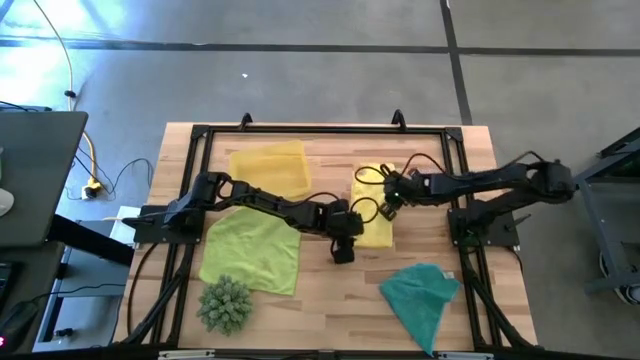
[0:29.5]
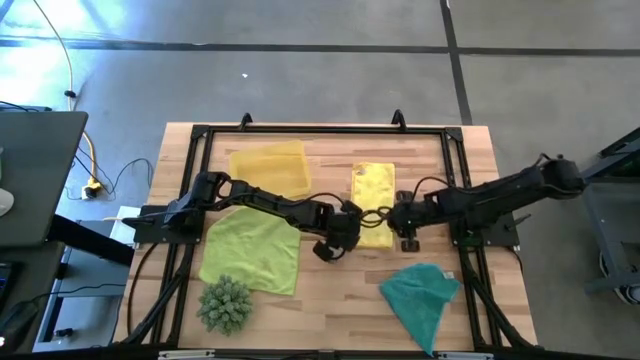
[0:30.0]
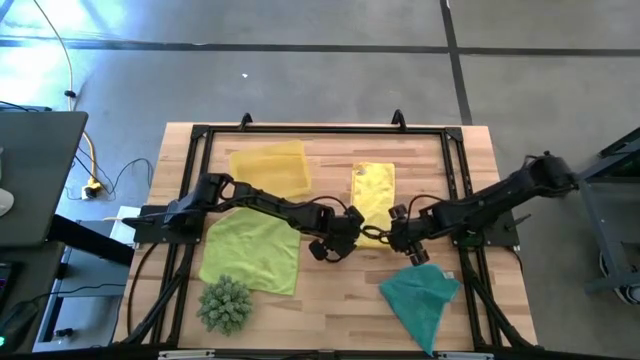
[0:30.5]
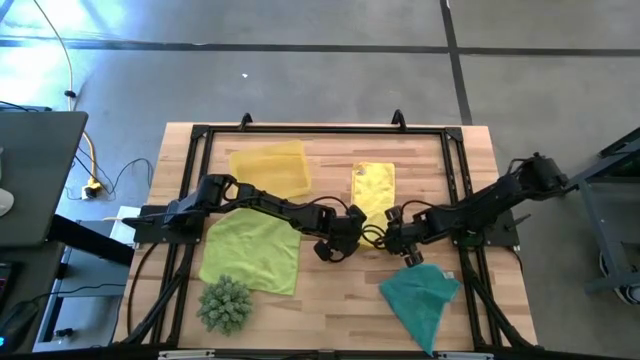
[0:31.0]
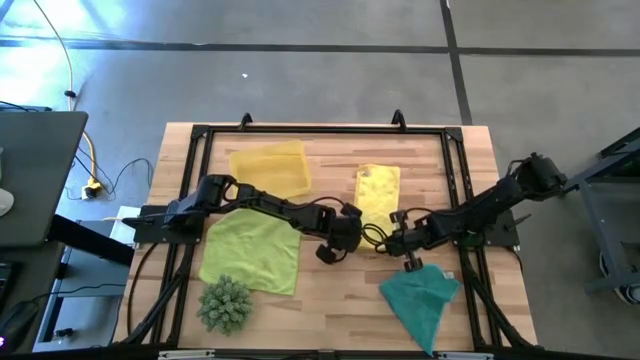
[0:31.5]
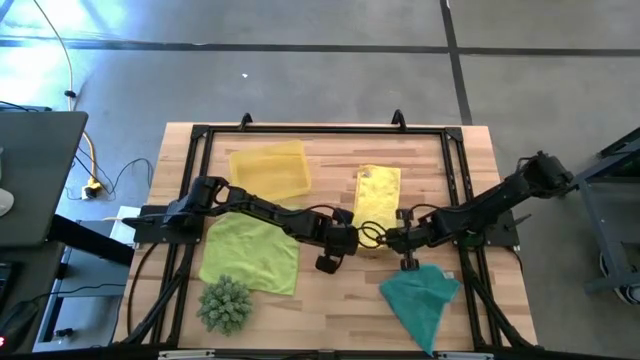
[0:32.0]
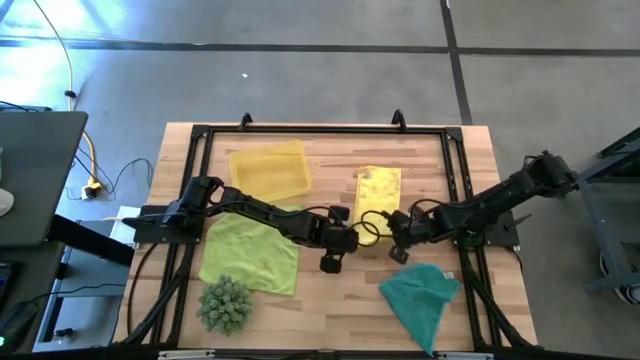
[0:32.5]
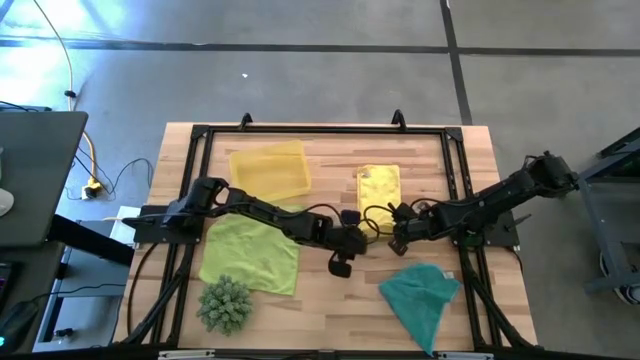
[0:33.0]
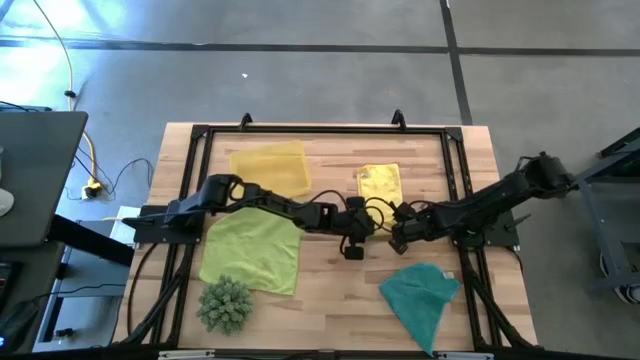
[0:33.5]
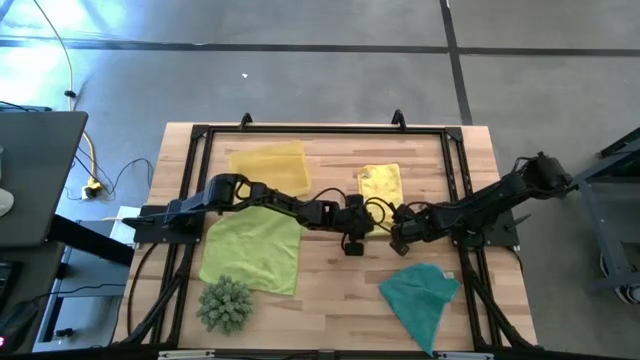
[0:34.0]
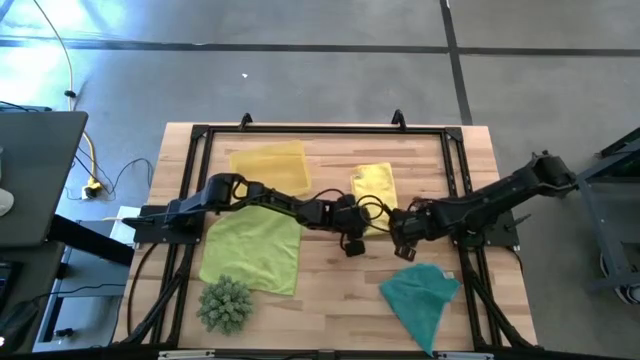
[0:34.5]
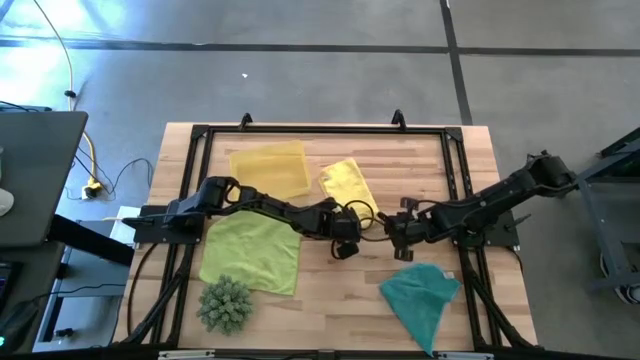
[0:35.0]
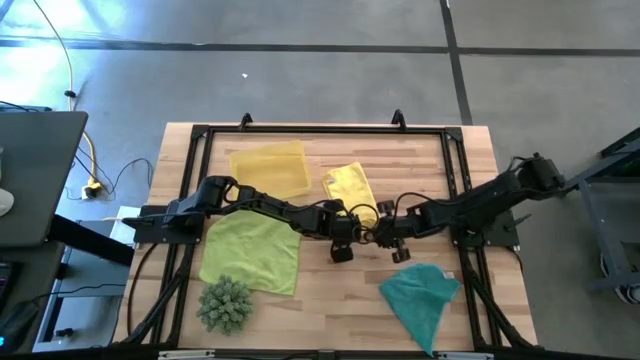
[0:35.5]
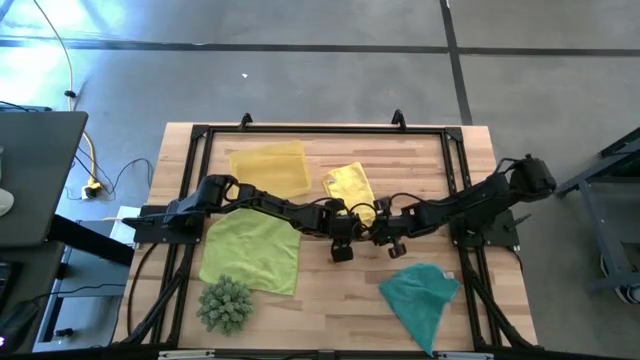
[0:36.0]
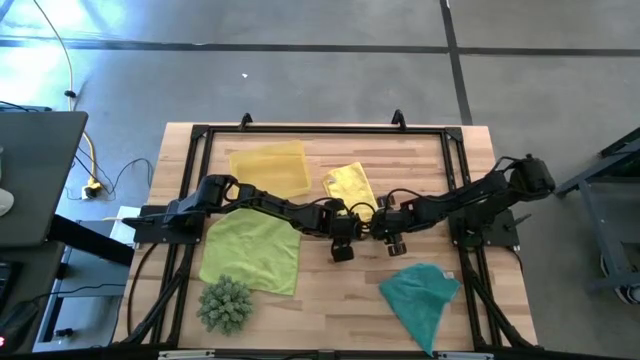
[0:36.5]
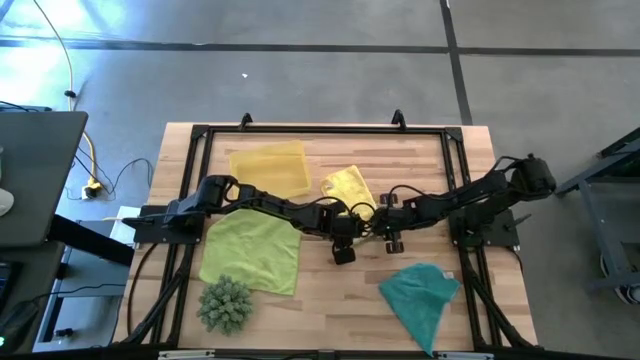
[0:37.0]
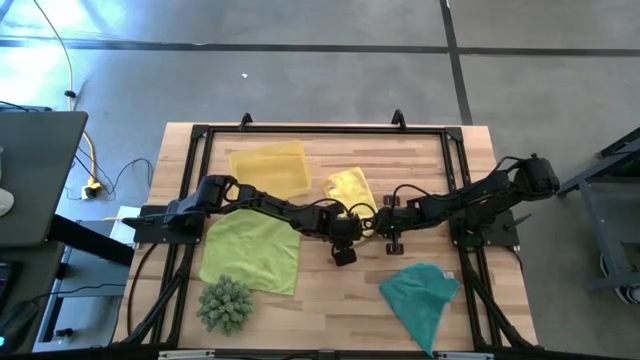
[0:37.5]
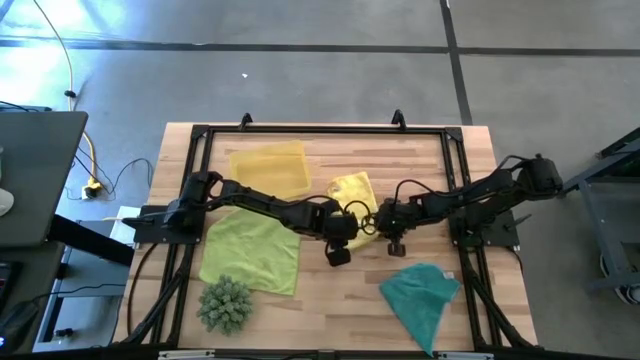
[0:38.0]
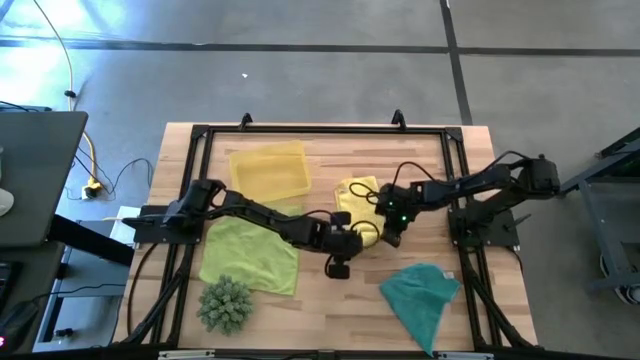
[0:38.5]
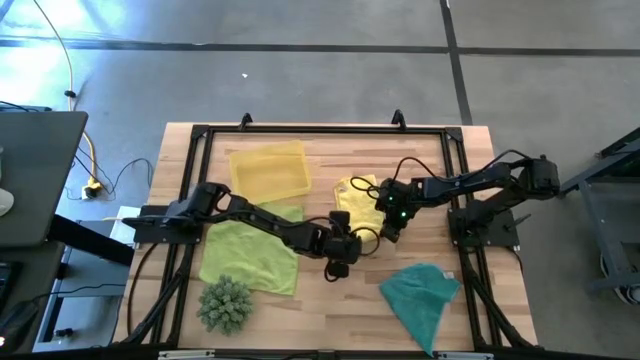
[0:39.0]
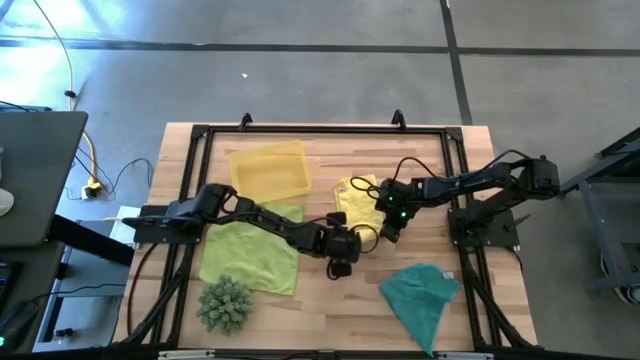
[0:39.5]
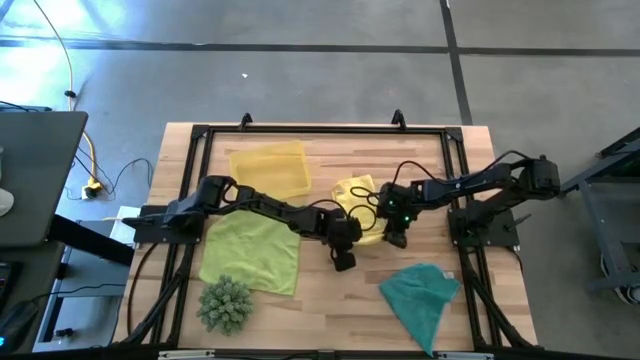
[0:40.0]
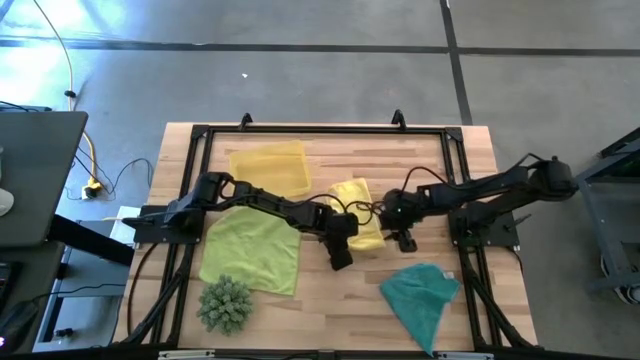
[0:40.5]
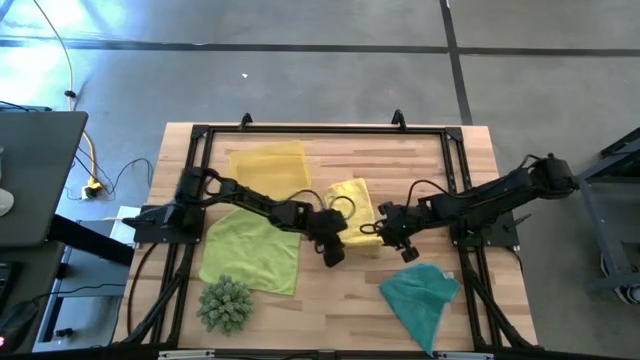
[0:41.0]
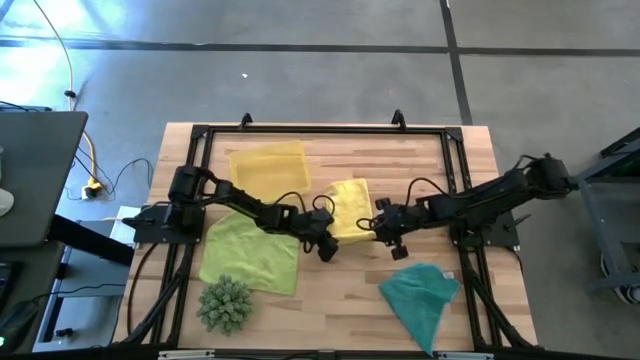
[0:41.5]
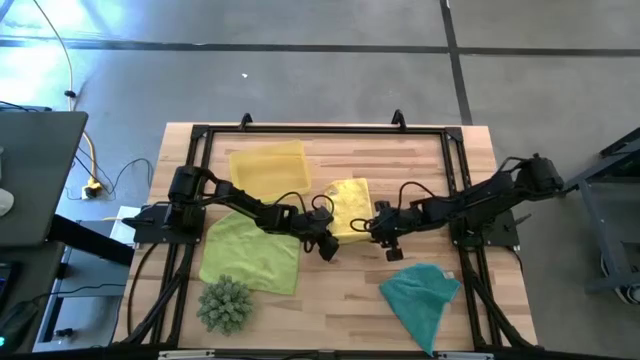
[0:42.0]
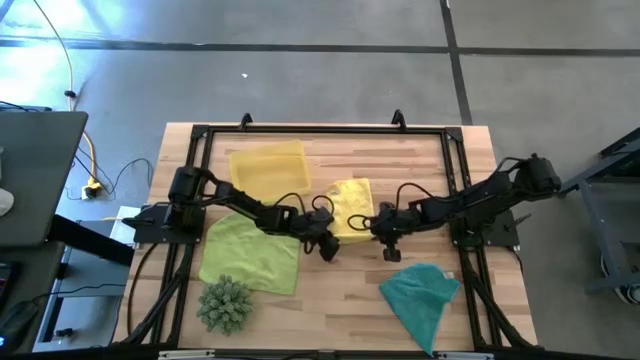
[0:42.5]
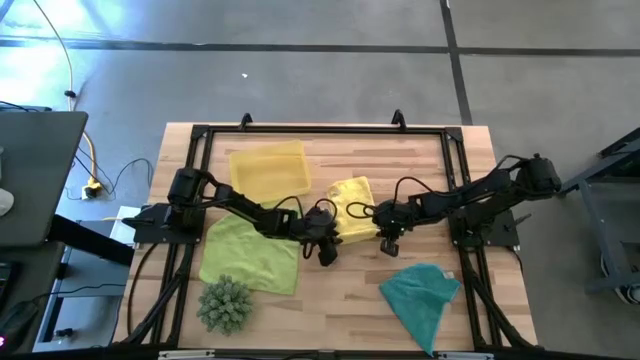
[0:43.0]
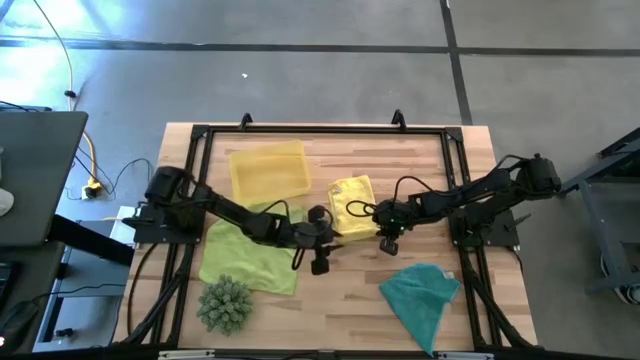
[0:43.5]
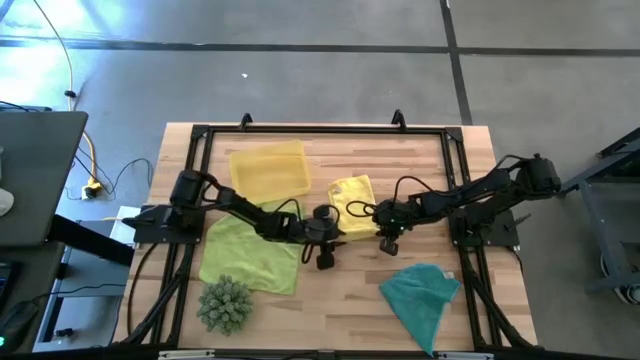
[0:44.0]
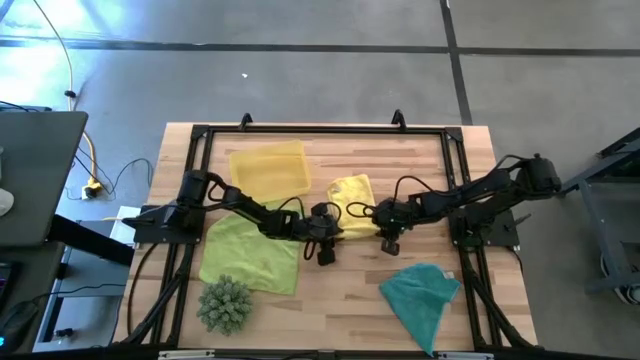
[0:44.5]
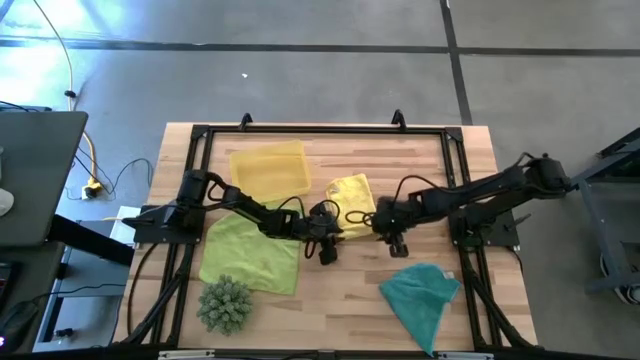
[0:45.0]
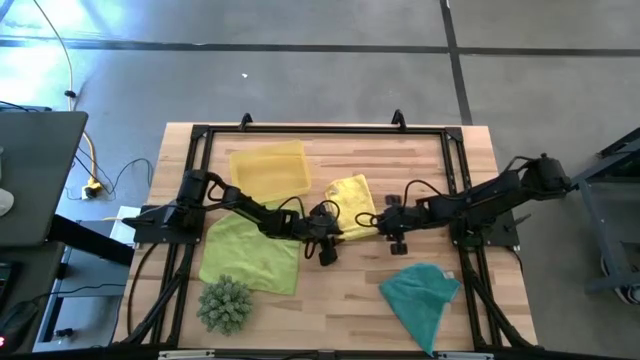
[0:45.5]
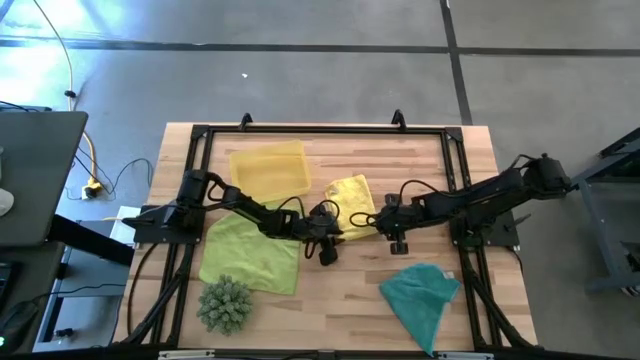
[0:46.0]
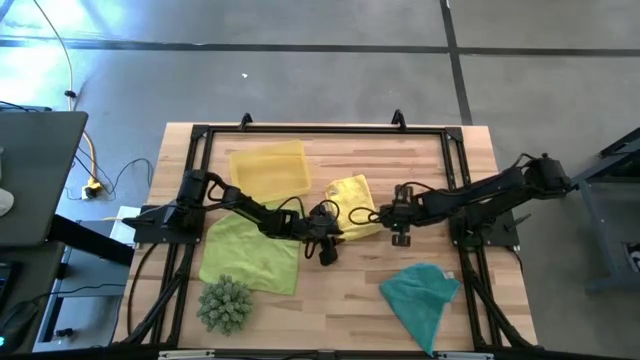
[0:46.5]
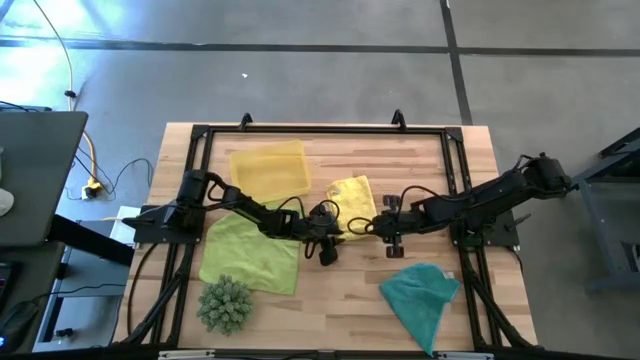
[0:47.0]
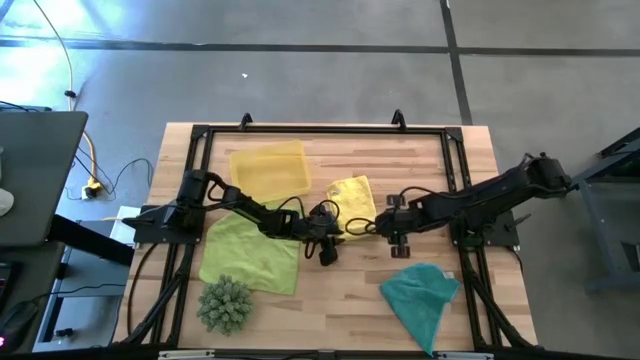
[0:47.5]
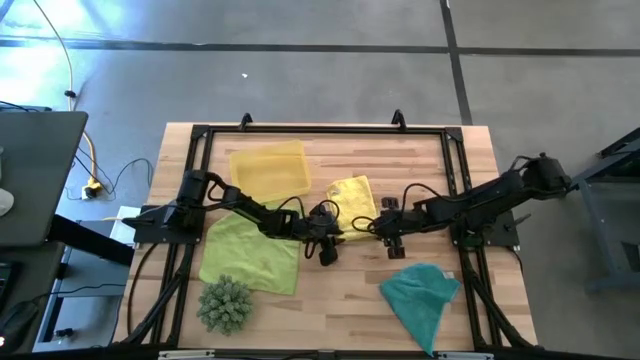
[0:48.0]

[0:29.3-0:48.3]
Task: Roll microfiber towels into tight, uniform cylinder then place into a basket
Roll the yellow microfiber towel
